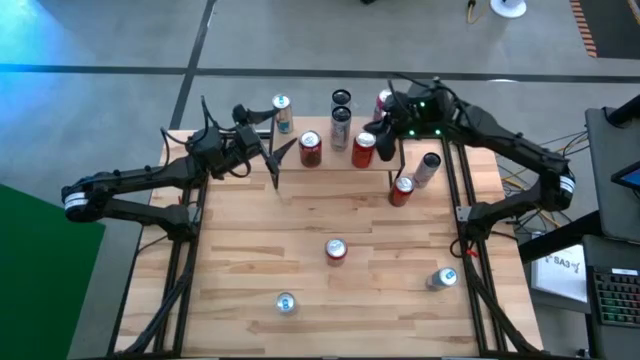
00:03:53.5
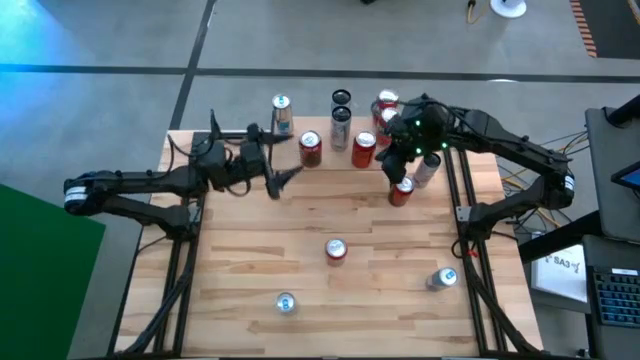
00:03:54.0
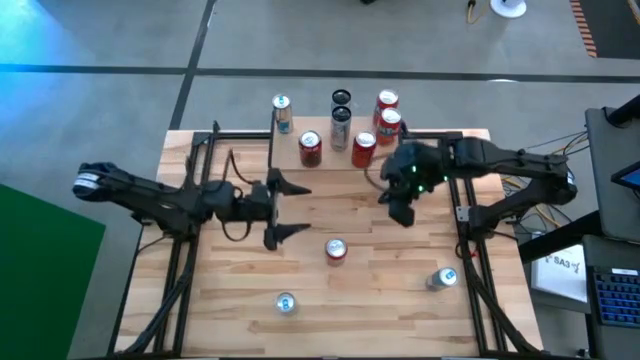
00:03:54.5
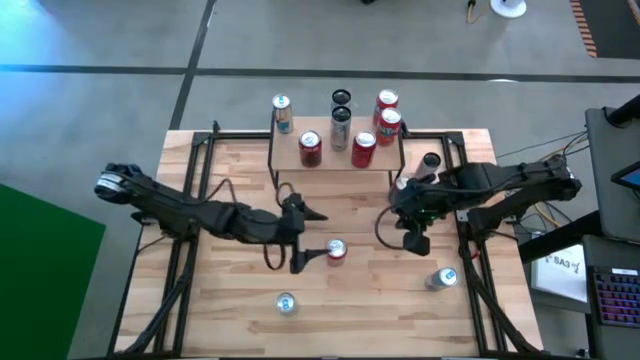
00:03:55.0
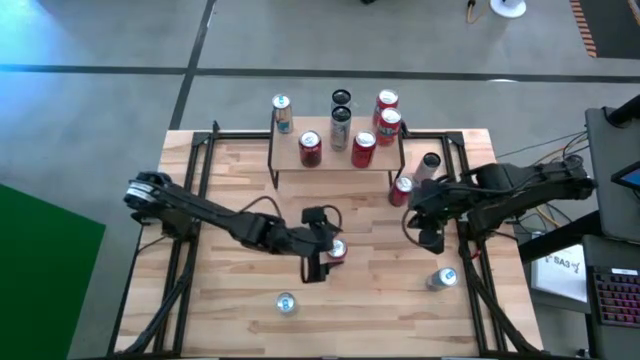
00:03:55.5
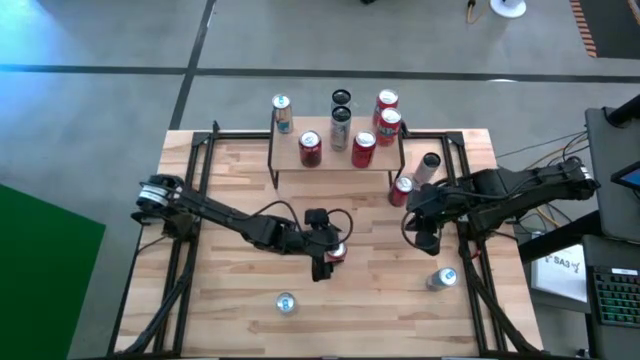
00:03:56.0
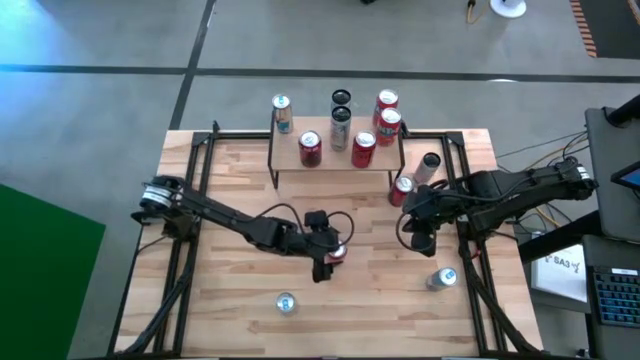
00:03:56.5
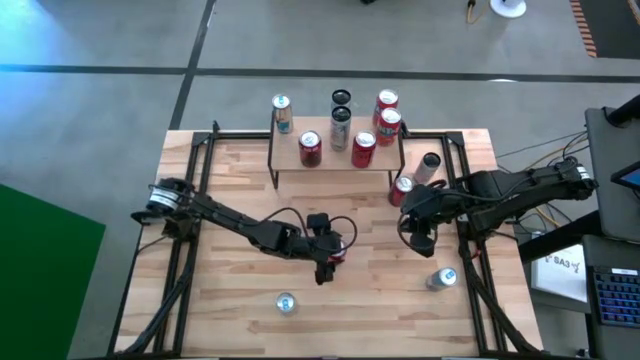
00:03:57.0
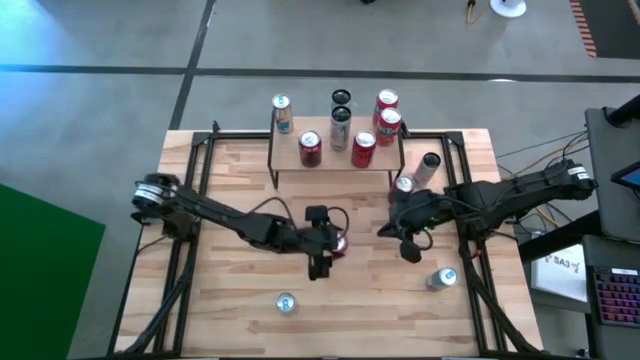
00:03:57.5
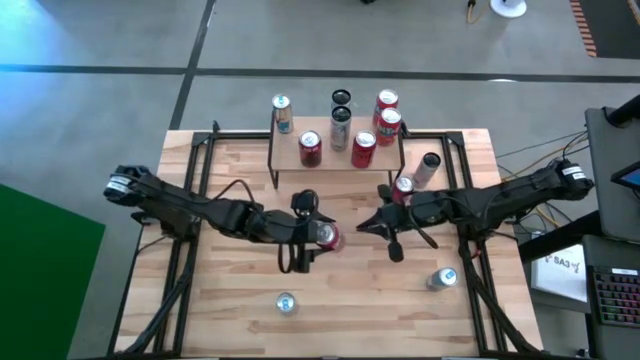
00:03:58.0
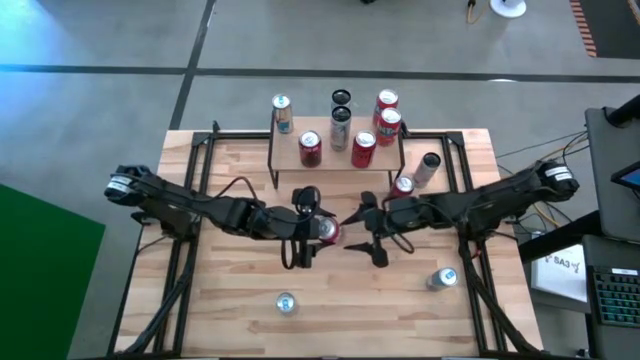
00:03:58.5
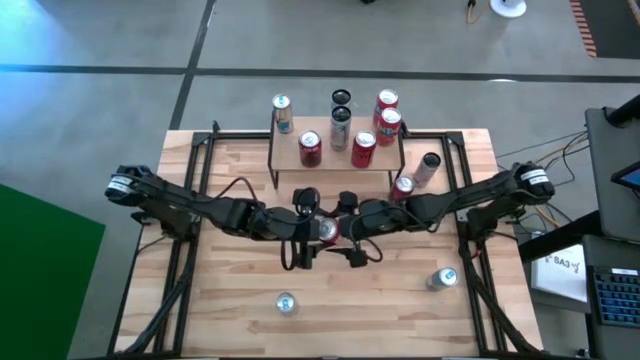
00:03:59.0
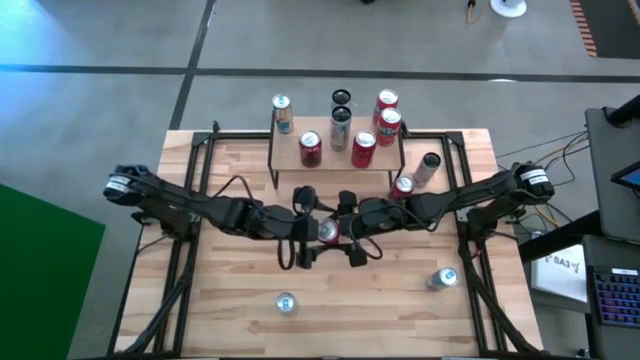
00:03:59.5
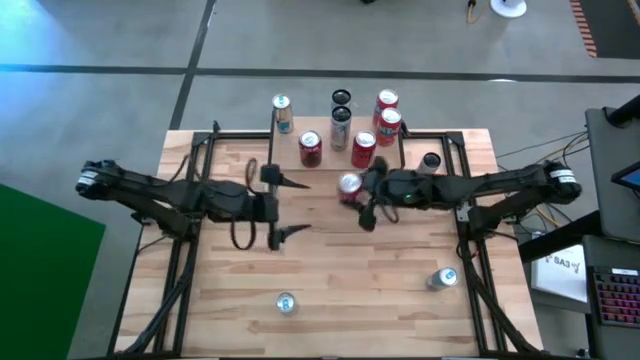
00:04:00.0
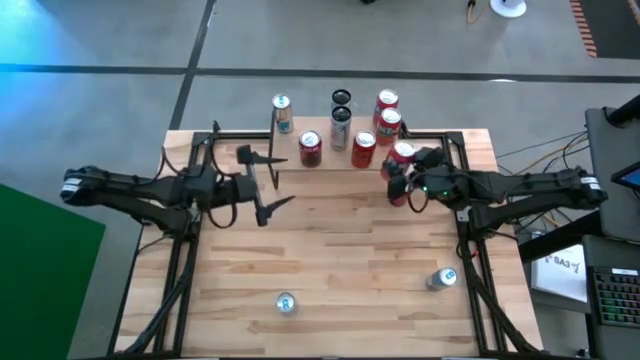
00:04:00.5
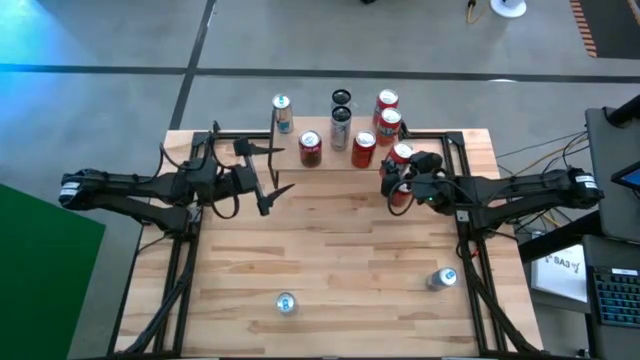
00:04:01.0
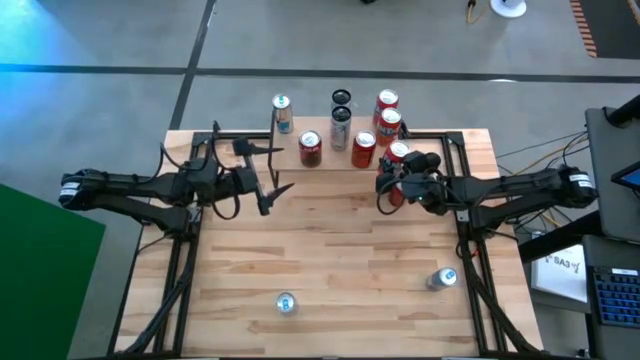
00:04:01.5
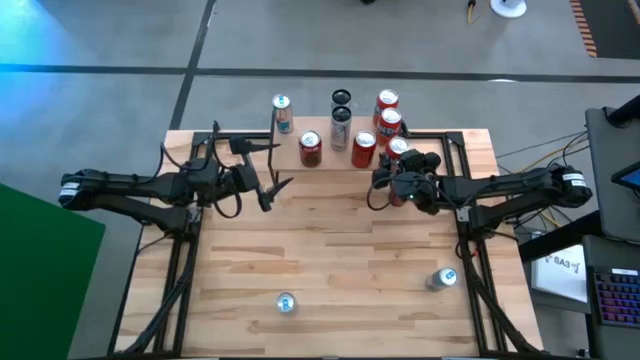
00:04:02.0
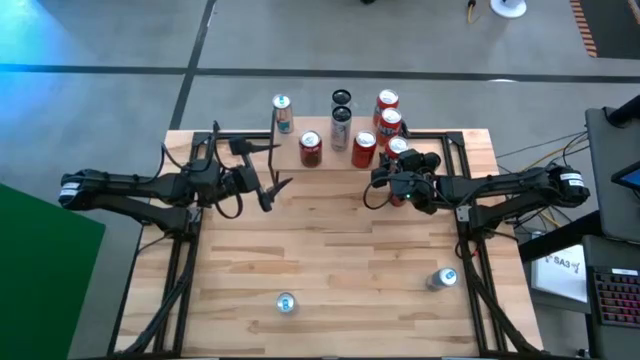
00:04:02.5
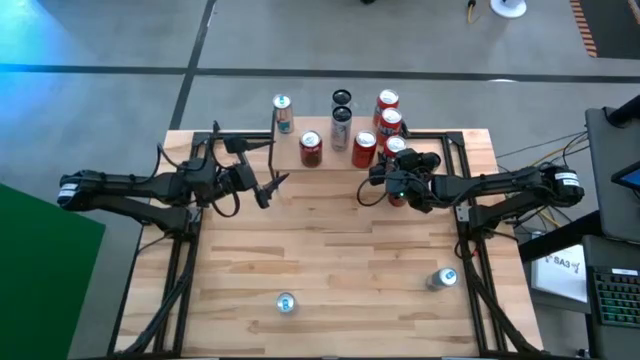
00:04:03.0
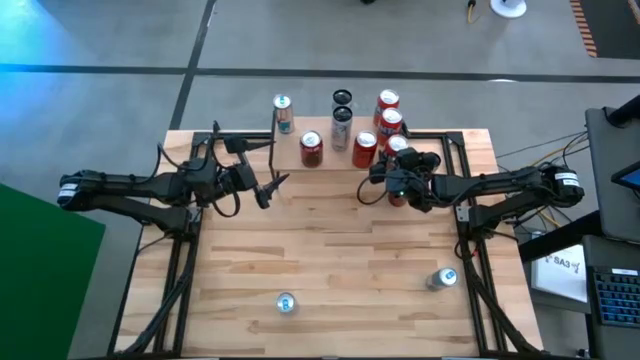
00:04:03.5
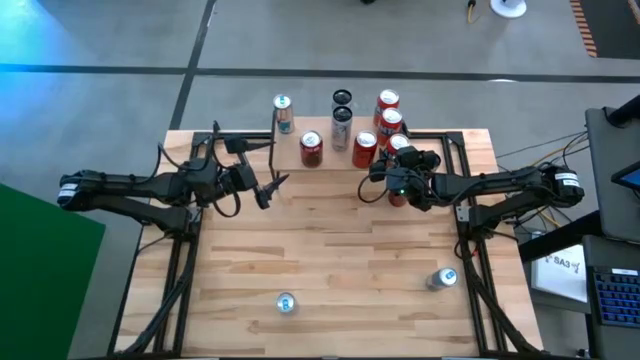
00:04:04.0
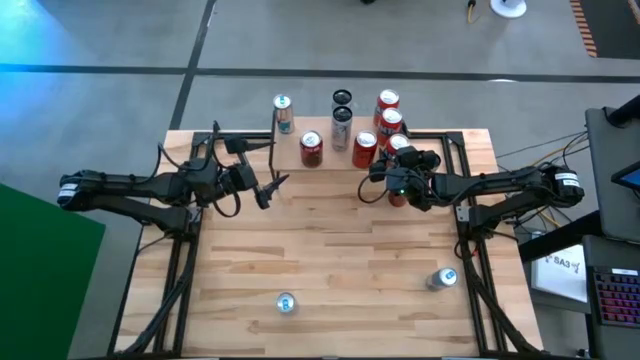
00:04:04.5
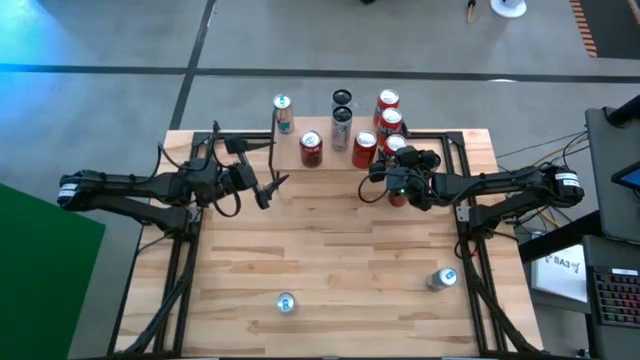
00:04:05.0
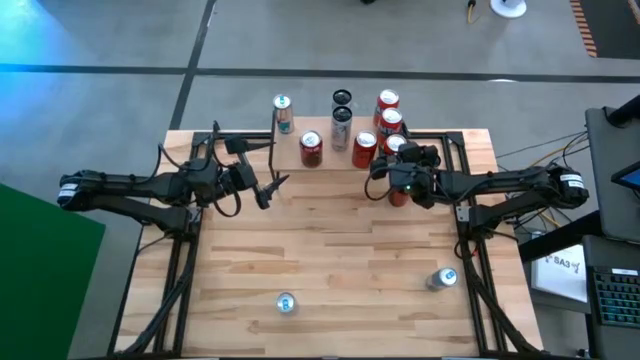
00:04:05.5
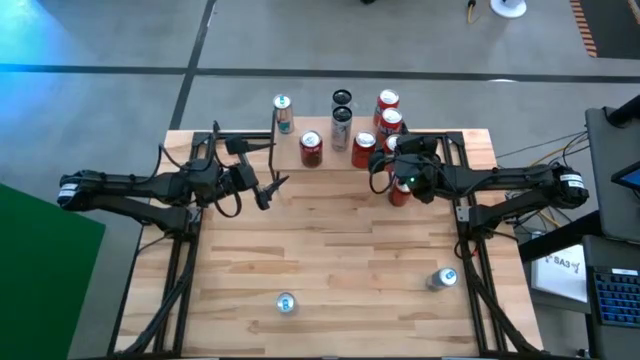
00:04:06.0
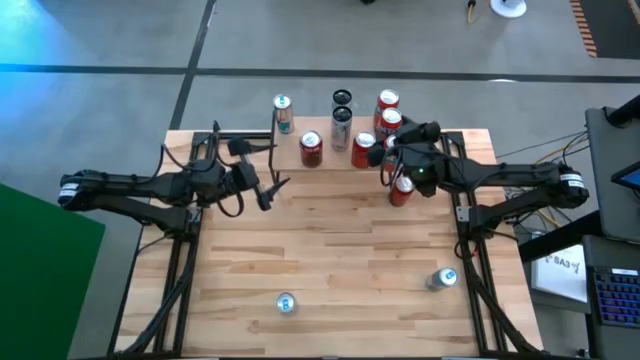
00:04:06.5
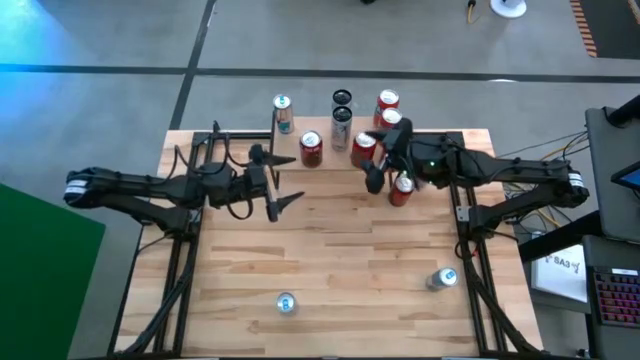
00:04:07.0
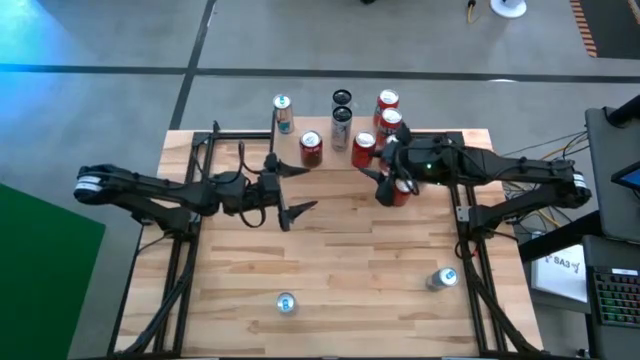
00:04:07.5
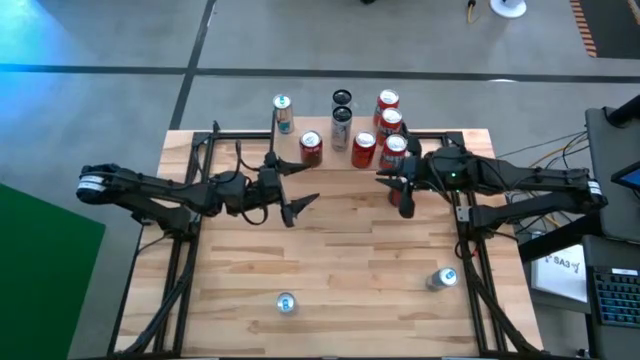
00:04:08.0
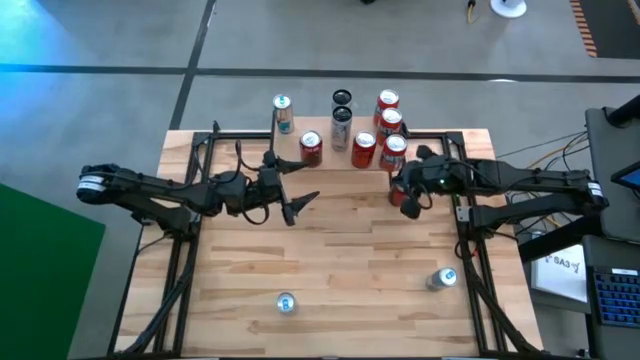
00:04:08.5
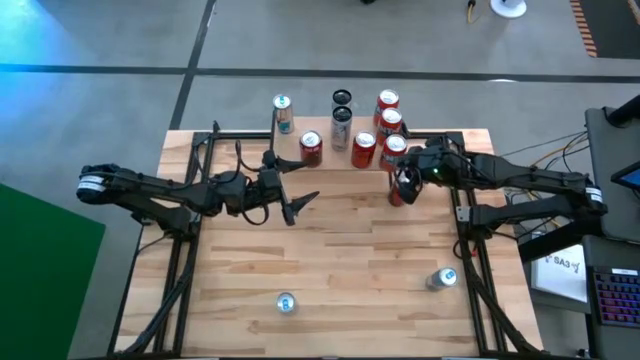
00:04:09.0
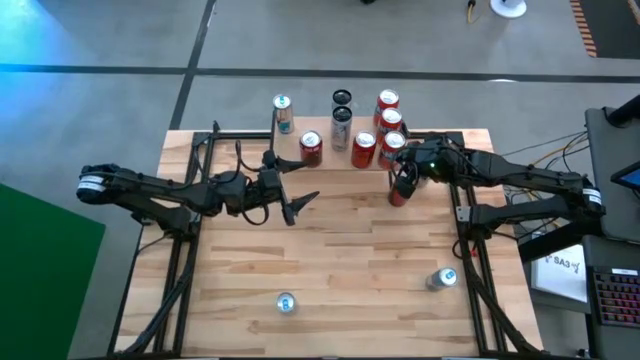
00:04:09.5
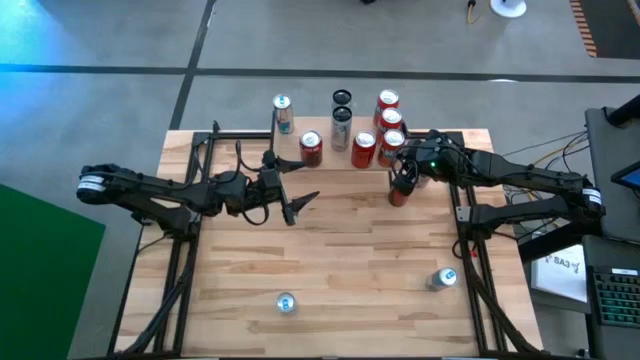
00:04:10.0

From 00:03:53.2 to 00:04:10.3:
Task: Place canned beverage on shelf
Put the red soda can on the shelf

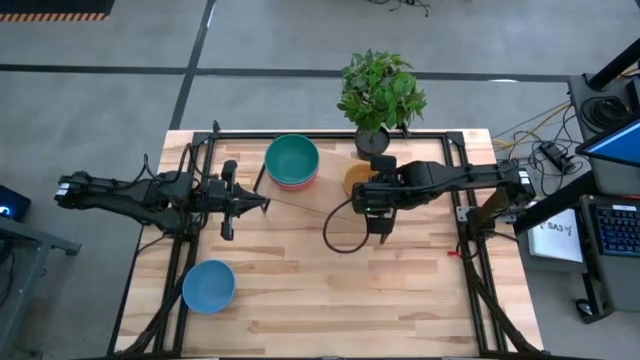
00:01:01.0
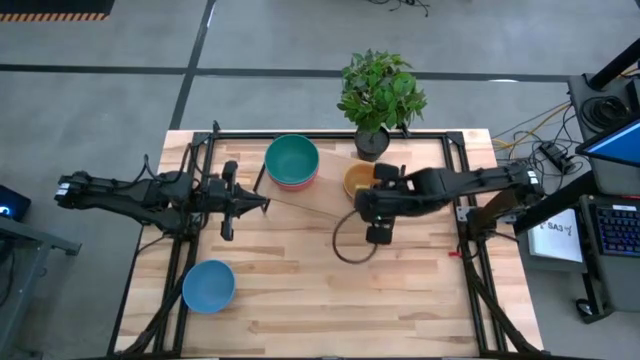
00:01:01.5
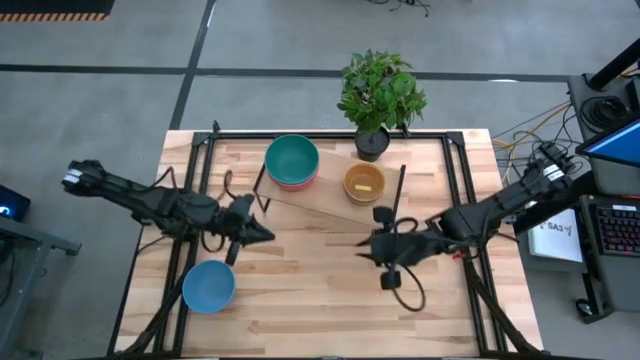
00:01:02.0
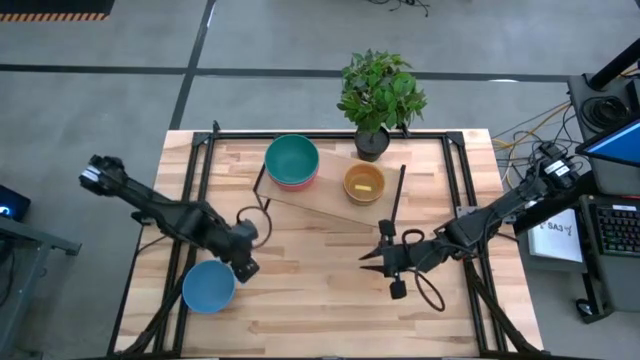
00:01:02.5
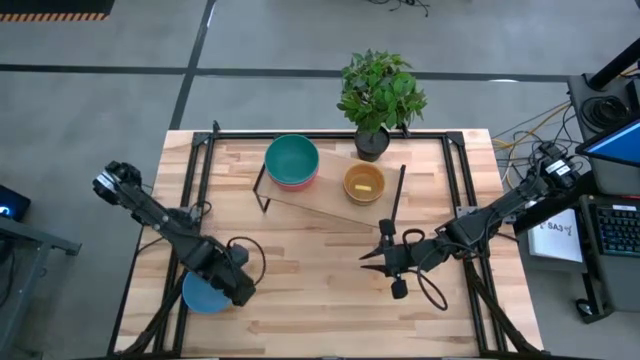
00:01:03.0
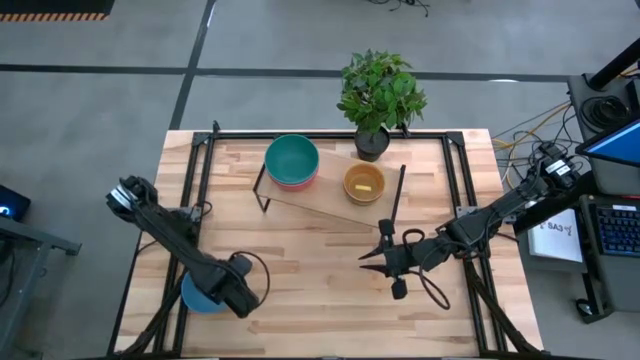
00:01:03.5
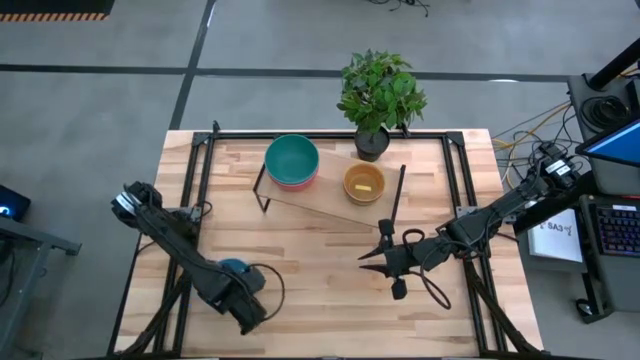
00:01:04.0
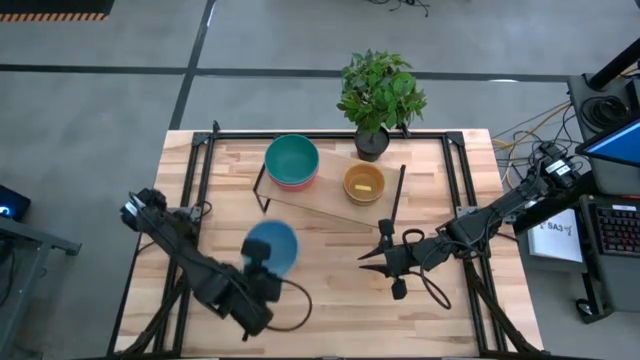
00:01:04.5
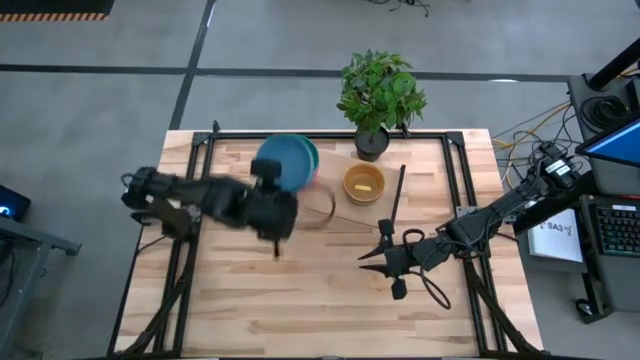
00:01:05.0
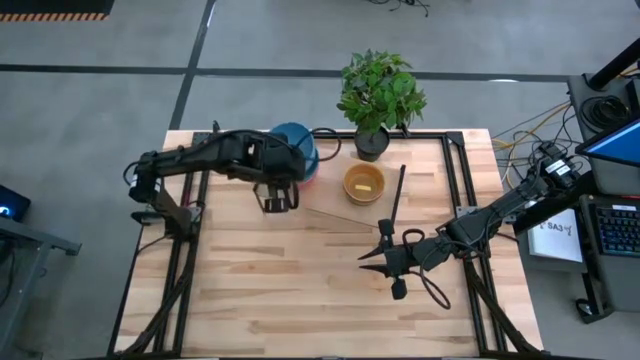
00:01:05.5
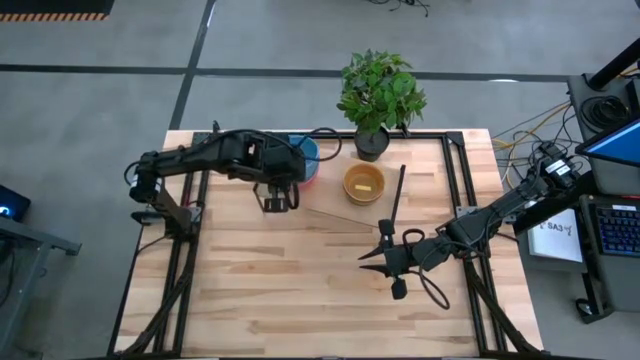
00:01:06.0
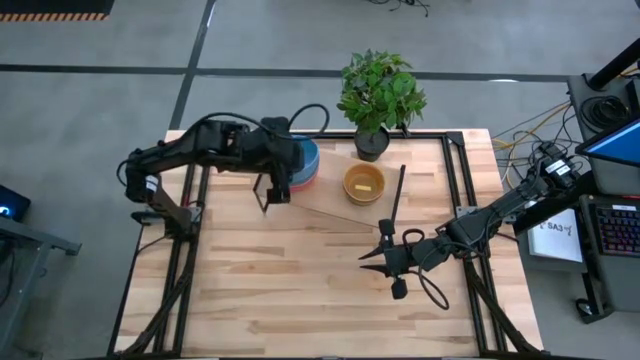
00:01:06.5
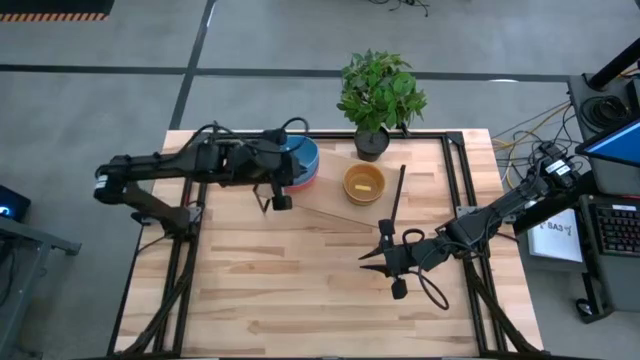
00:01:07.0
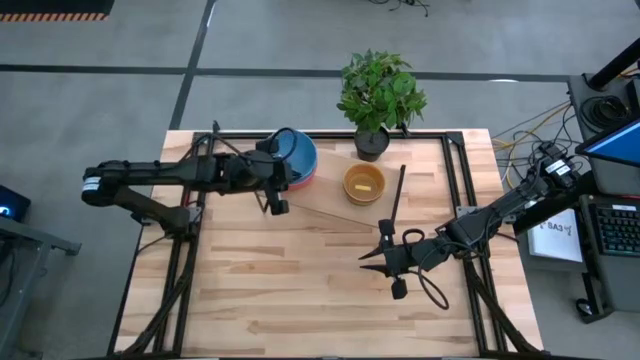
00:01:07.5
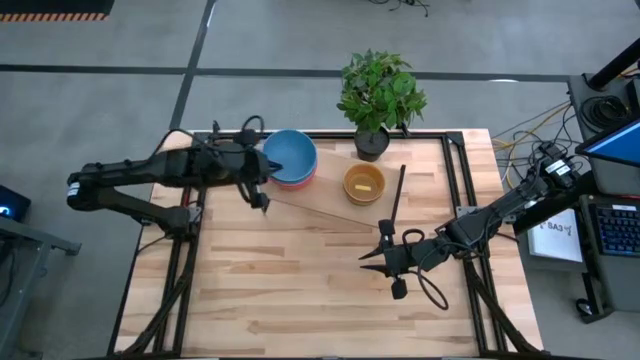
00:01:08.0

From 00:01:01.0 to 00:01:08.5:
Task: Place and stack bowls onto a shelf
Stack the blue bowl on top of the light blue bowl on the shelf
